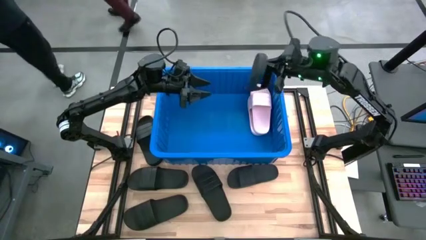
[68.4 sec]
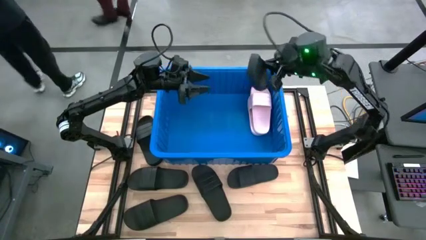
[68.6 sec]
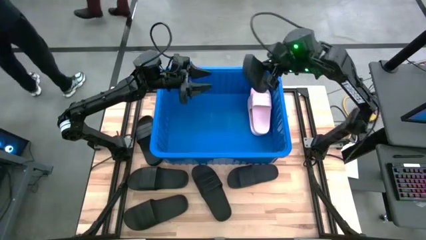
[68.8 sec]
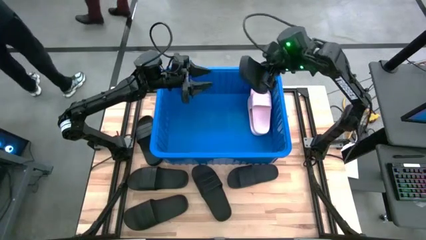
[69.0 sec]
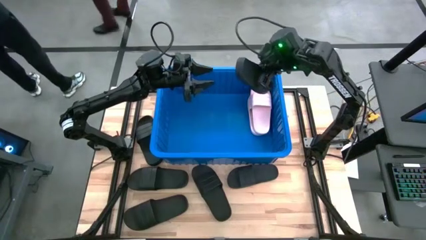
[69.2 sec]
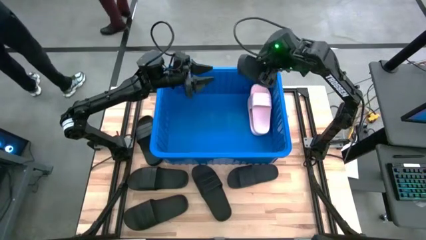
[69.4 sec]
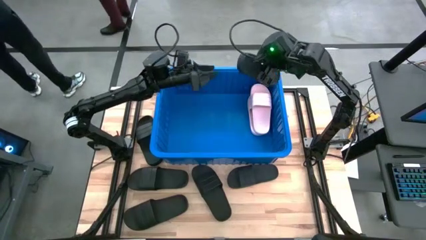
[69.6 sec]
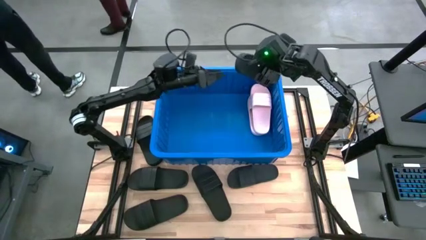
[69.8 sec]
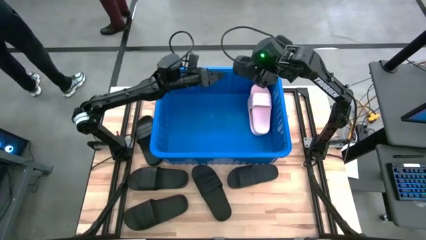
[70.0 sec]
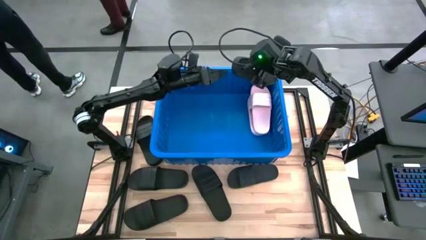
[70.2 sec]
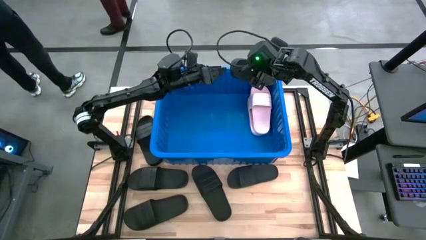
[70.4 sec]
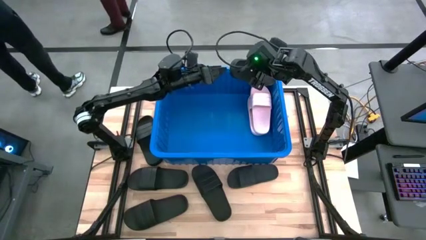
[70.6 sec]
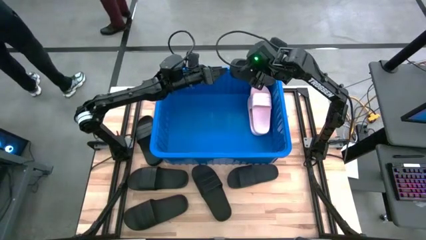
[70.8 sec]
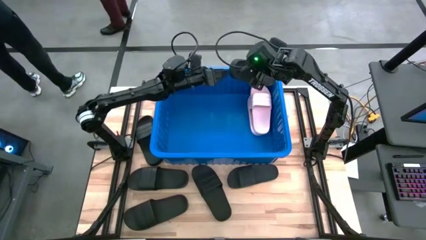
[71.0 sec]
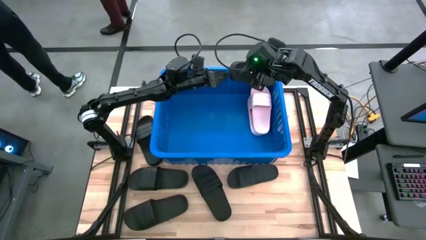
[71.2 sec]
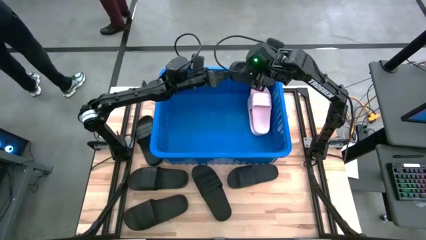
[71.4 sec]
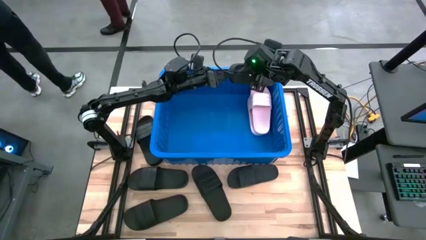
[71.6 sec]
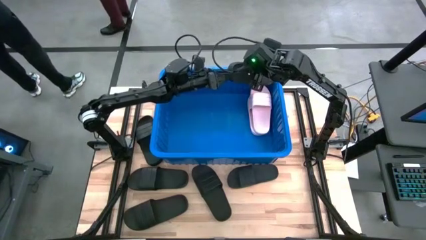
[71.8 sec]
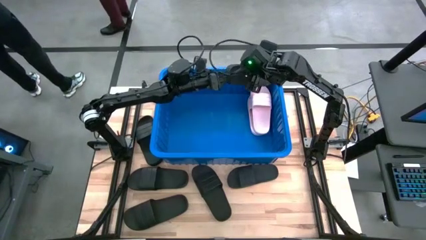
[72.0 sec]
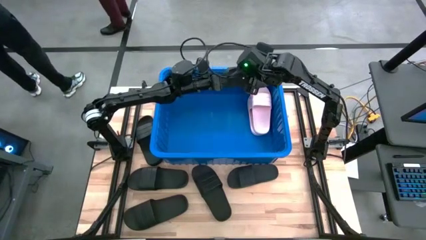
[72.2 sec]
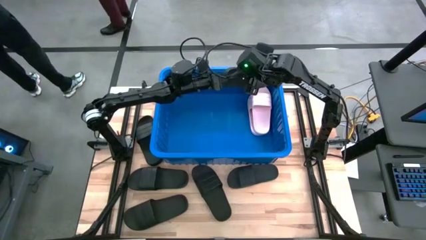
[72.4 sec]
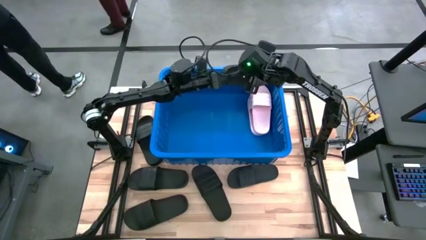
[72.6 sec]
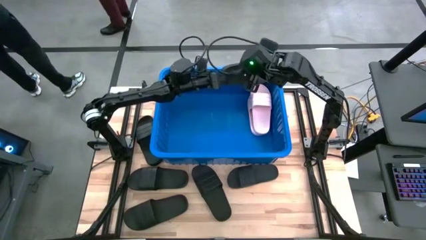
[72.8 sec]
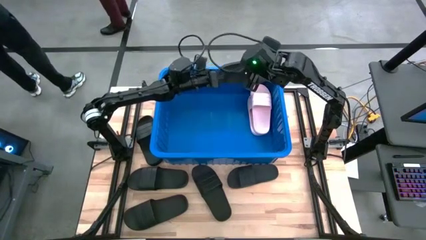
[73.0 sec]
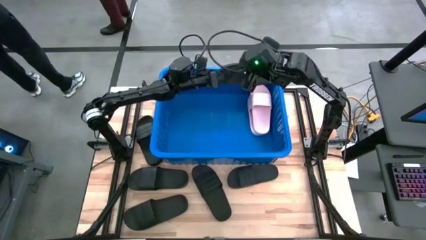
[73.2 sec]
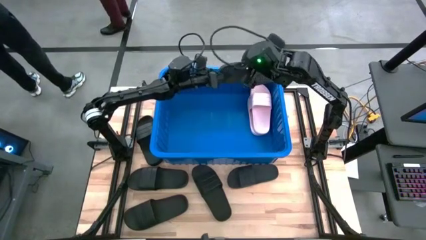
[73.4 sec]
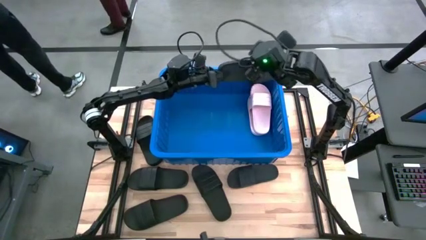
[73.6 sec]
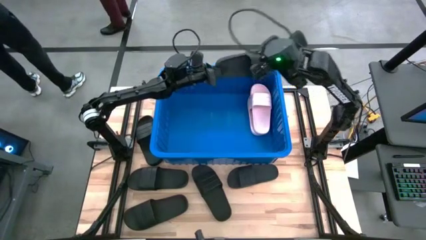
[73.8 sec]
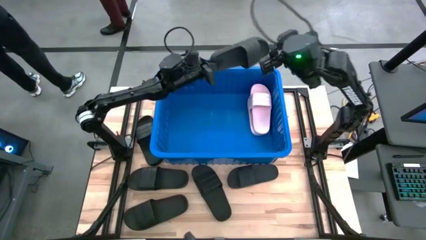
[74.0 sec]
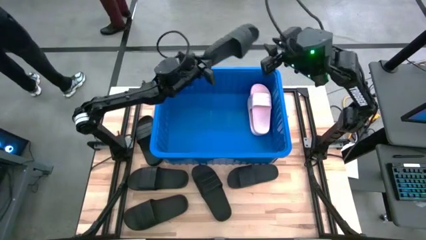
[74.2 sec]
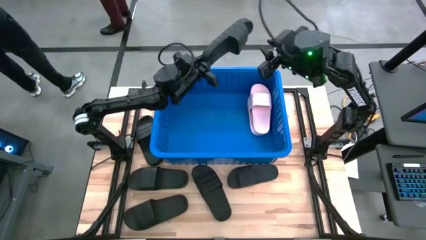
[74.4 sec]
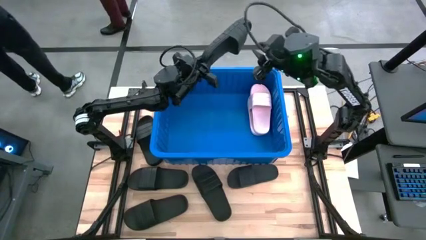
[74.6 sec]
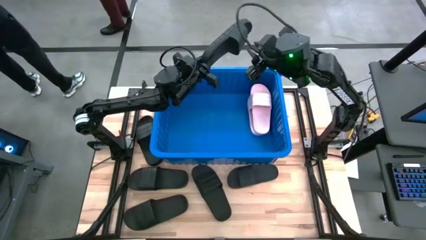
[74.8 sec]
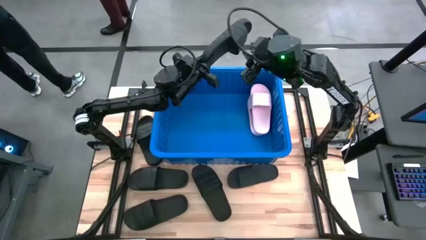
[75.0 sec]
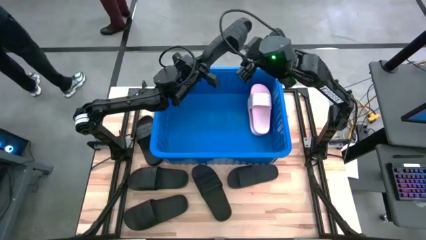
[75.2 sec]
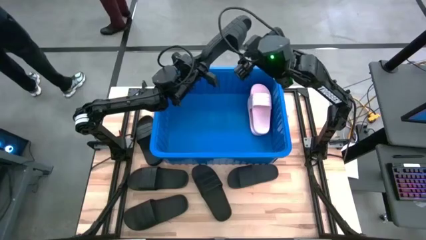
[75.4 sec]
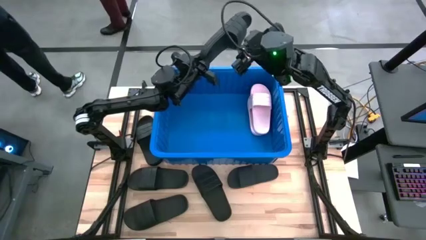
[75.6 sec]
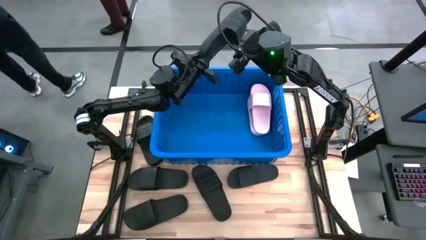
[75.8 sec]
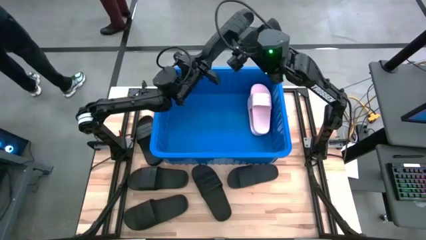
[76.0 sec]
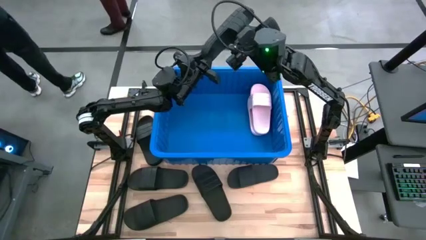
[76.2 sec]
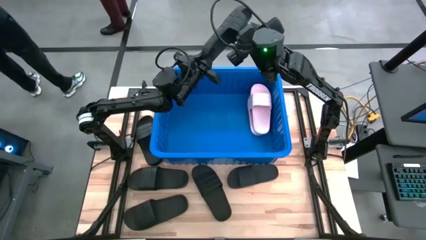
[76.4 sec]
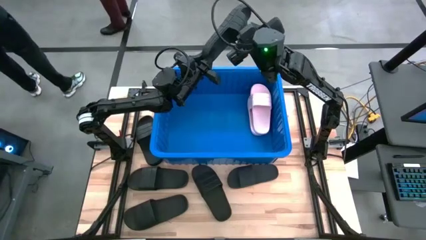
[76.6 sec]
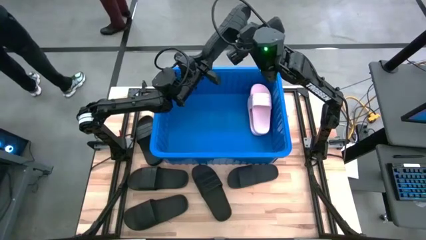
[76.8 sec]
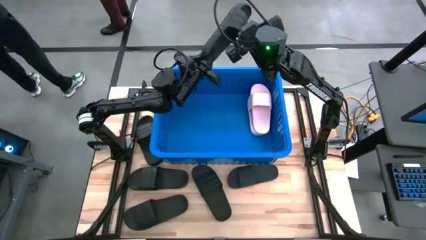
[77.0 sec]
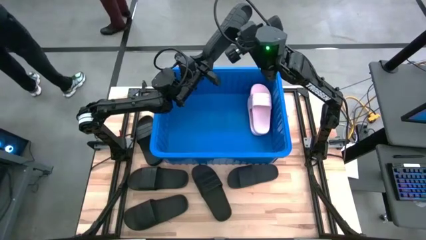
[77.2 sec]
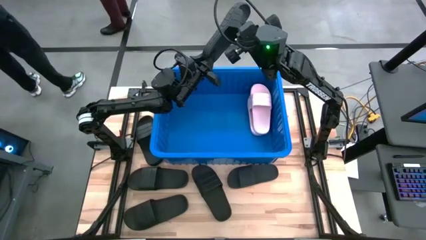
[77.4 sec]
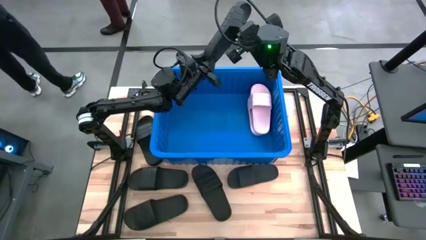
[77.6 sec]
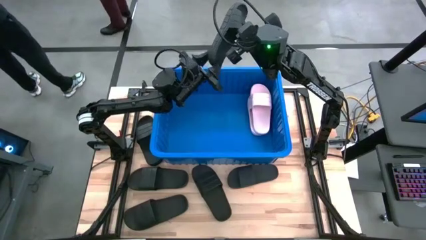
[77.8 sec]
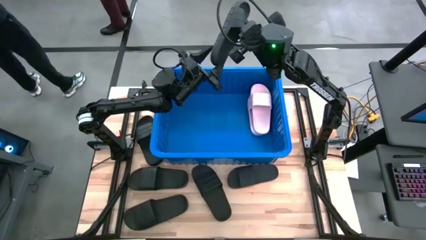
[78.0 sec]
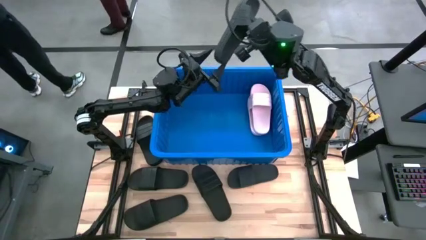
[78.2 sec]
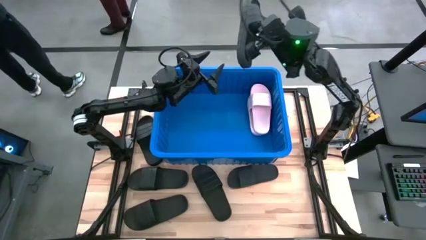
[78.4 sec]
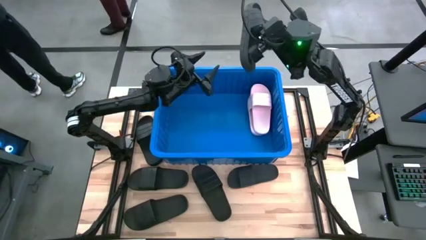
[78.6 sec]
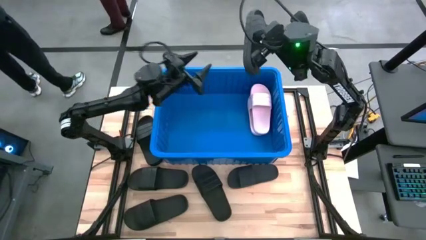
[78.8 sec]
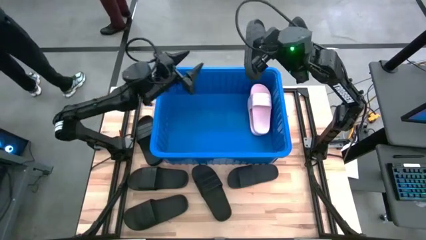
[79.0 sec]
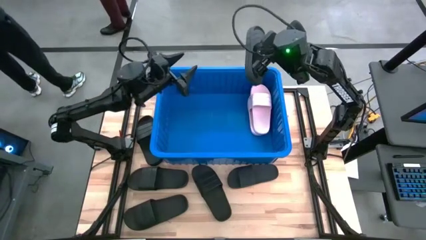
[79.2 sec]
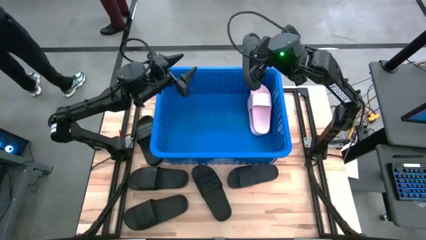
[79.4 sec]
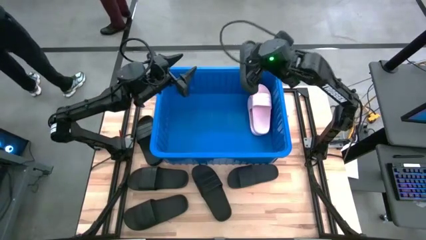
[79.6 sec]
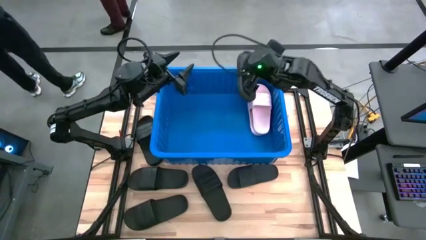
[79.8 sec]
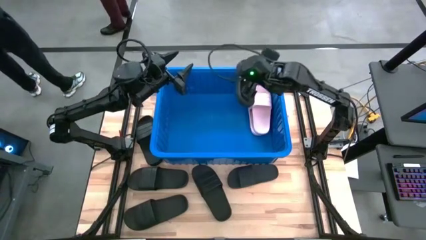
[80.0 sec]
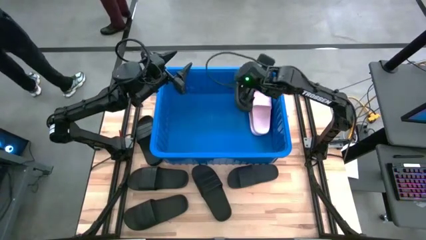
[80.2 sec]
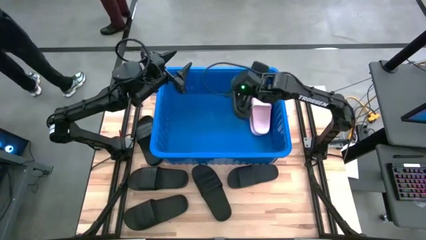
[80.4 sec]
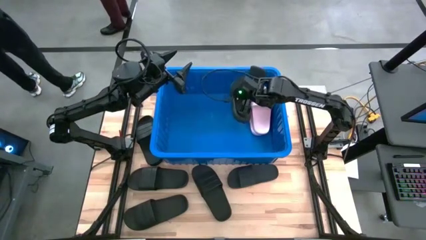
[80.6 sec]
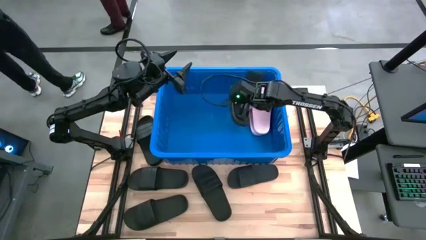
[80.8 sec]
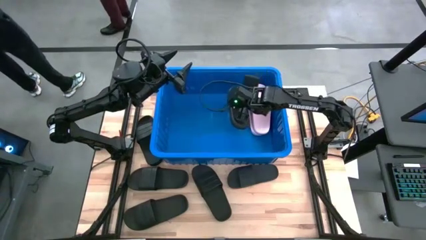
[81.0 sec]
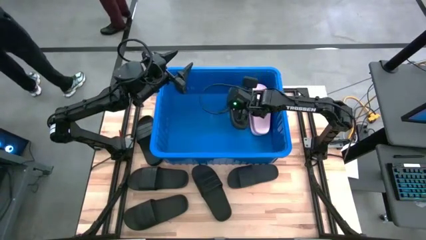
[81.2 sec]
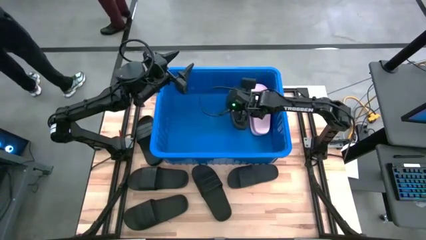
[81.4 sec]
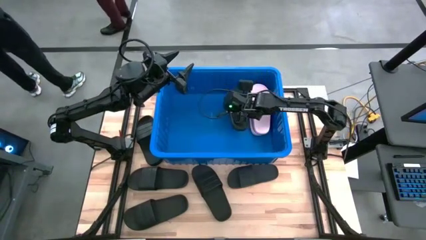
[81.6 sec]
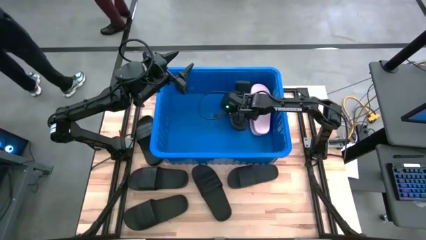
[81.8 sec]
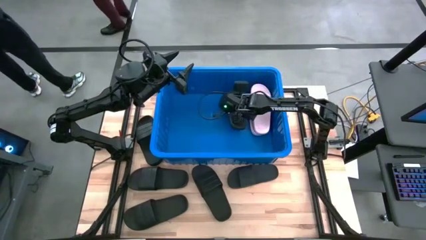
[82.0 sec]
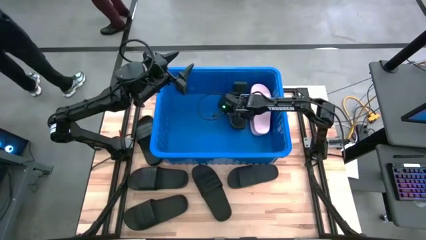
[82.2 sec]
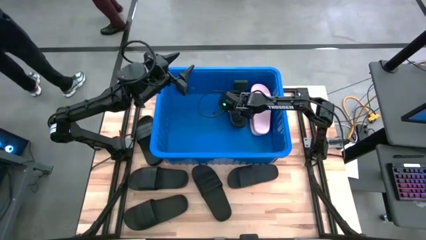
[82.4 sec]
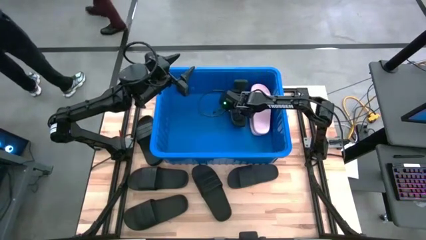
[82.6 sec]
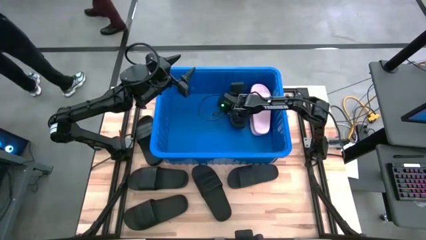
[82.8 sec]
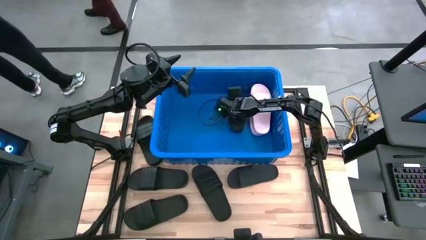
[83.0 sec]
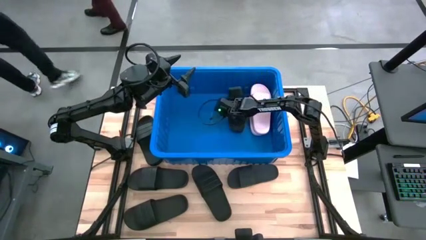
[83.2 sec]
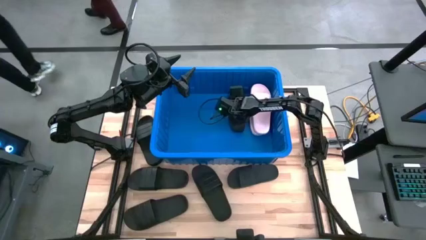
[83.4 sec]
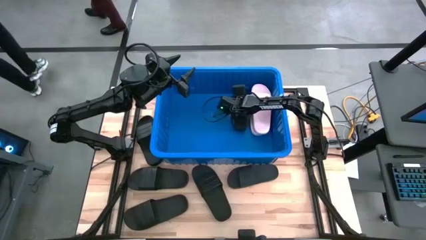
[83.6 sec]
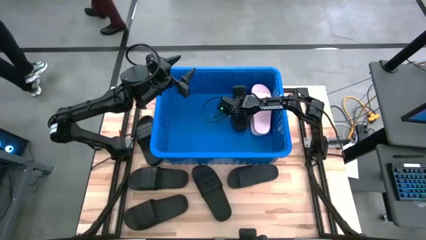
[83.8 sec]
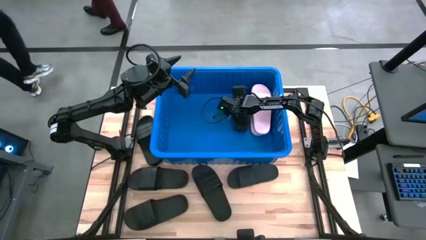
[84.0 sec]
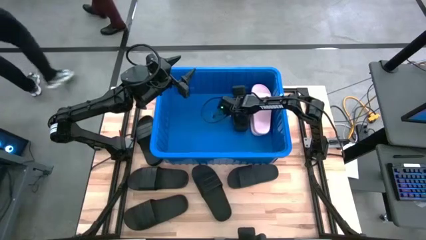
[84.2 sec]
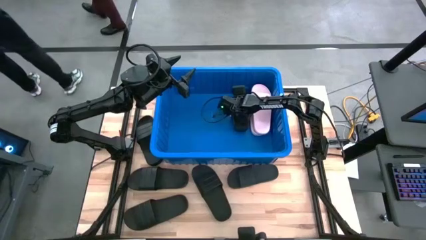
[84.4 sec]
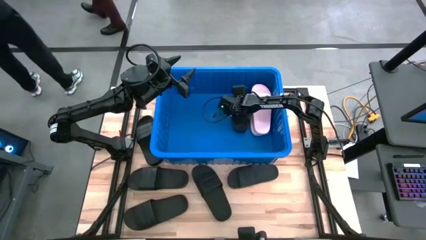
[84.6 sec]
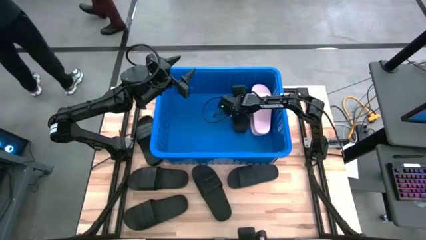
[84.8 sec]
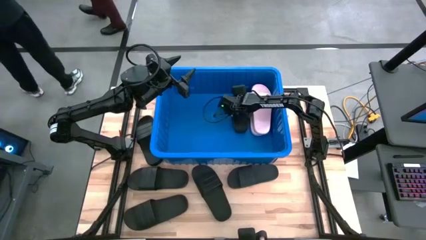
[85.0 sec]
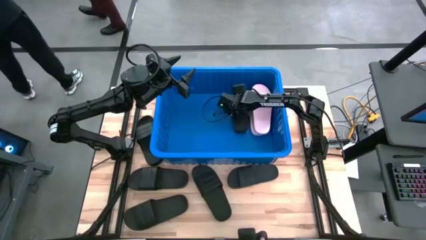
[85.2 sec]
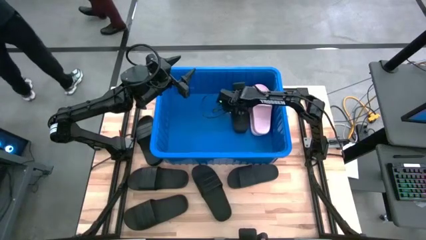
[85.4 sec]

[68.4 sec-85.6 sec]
Task: Pick and place slides into bin
Put the black slide into the blue bin
